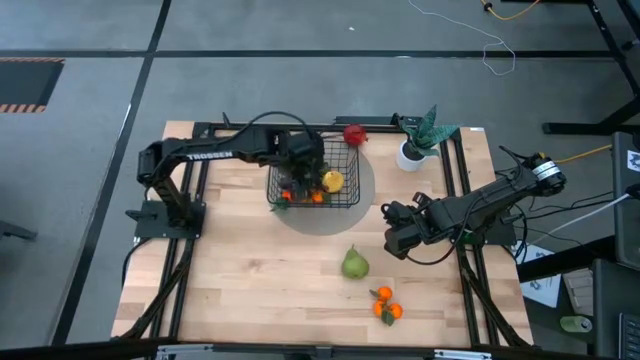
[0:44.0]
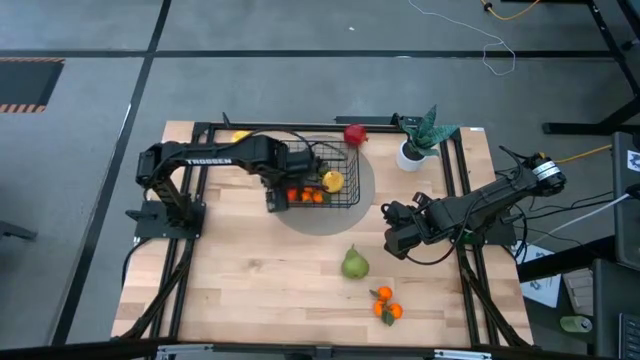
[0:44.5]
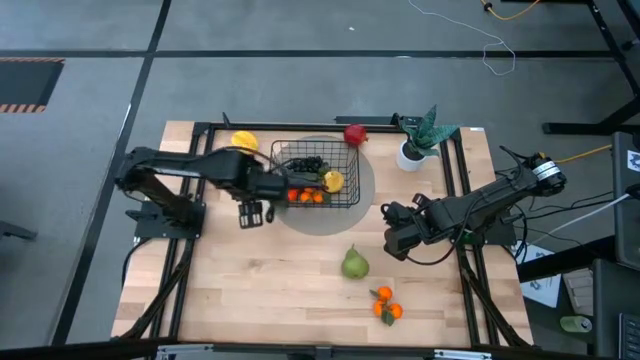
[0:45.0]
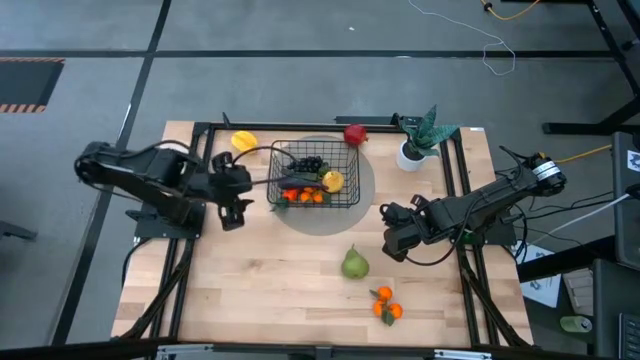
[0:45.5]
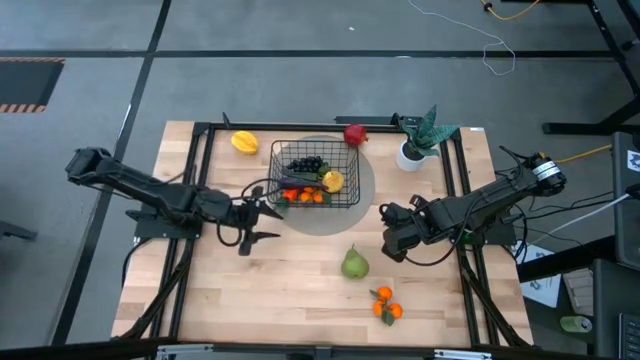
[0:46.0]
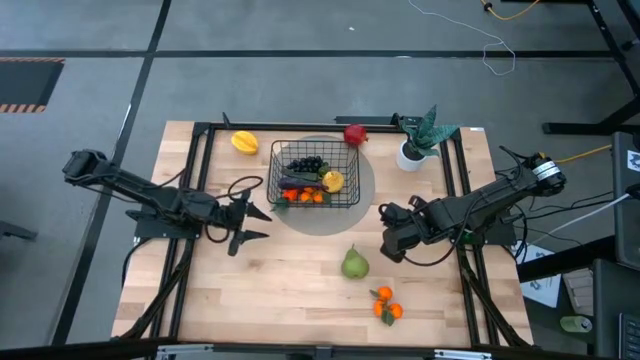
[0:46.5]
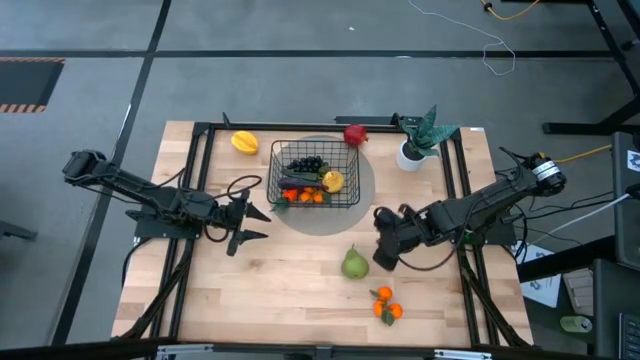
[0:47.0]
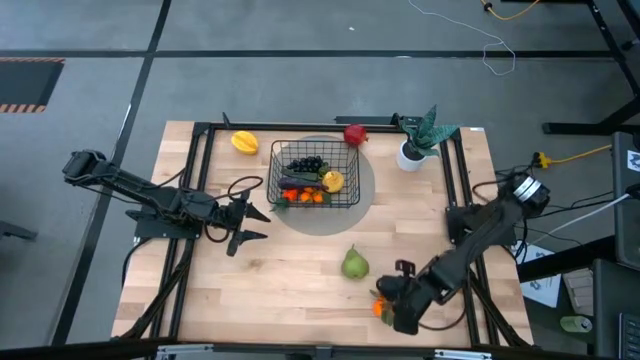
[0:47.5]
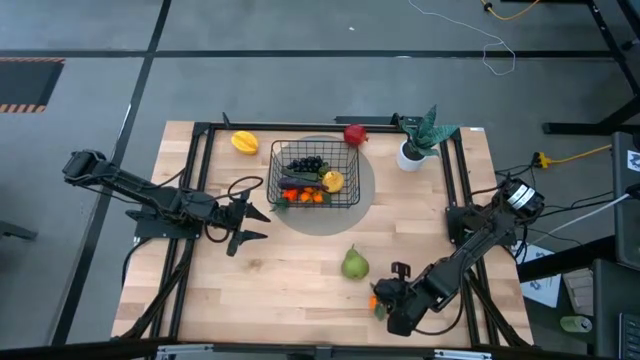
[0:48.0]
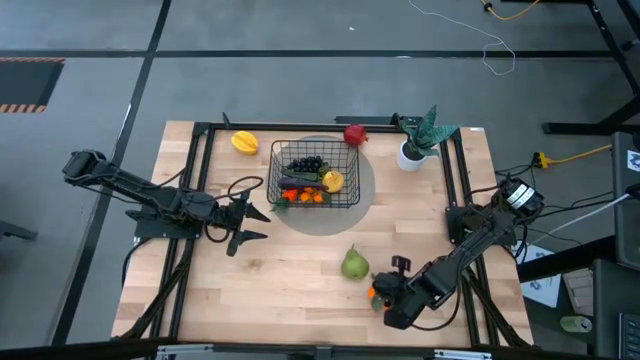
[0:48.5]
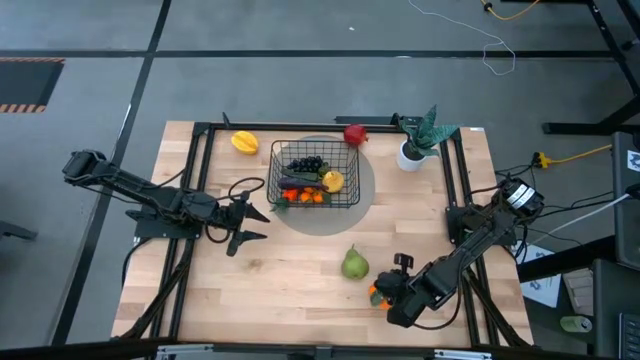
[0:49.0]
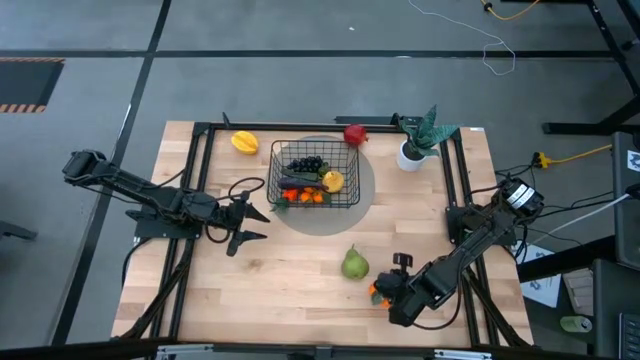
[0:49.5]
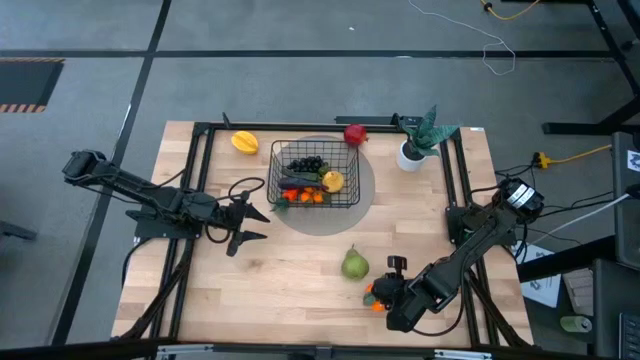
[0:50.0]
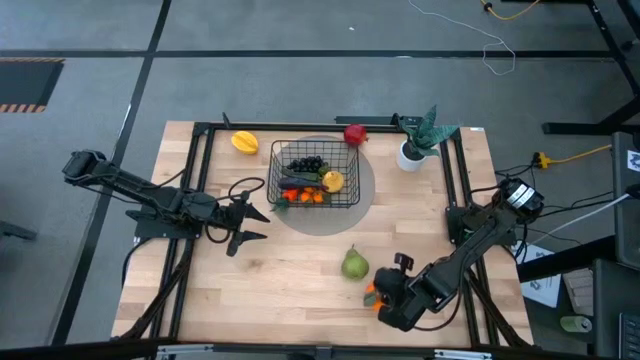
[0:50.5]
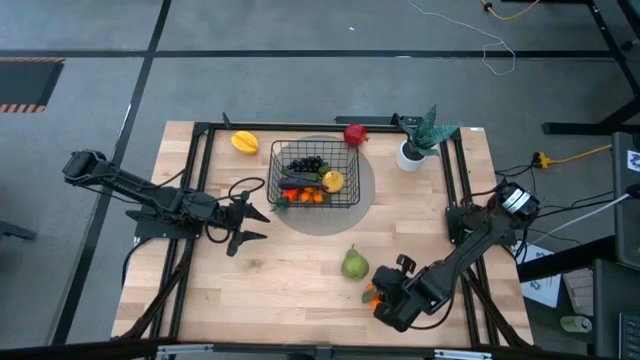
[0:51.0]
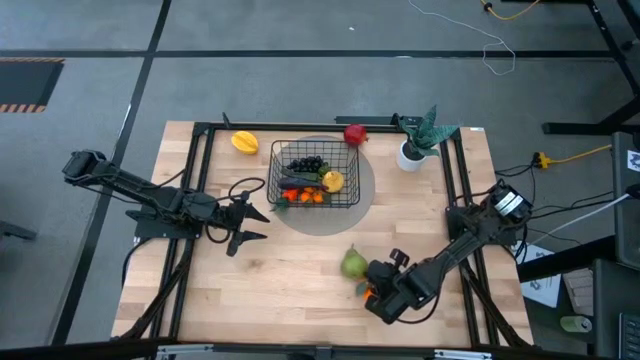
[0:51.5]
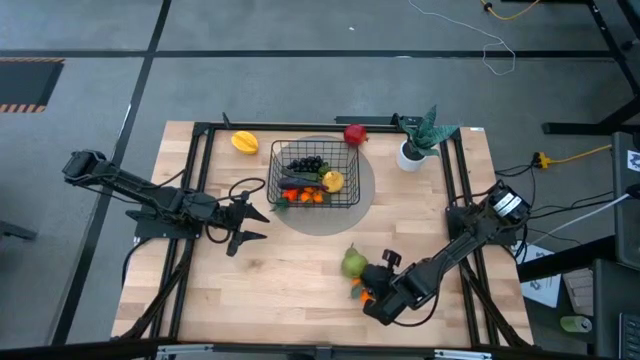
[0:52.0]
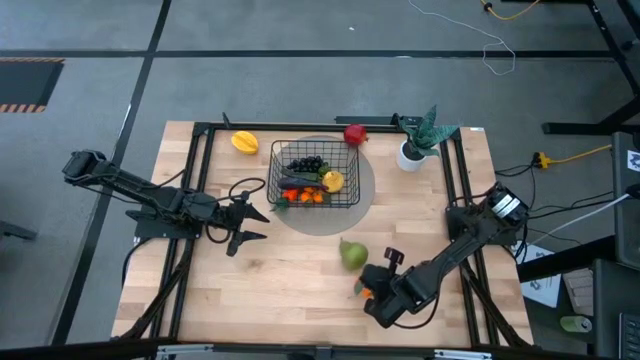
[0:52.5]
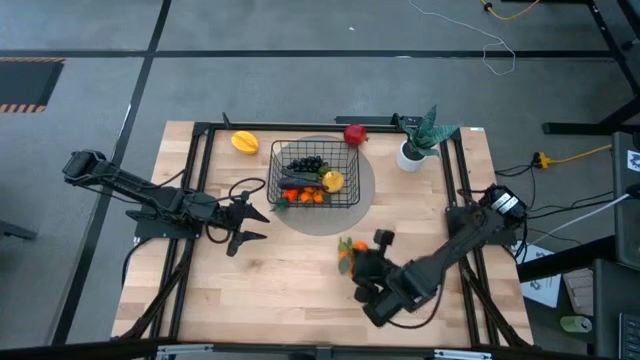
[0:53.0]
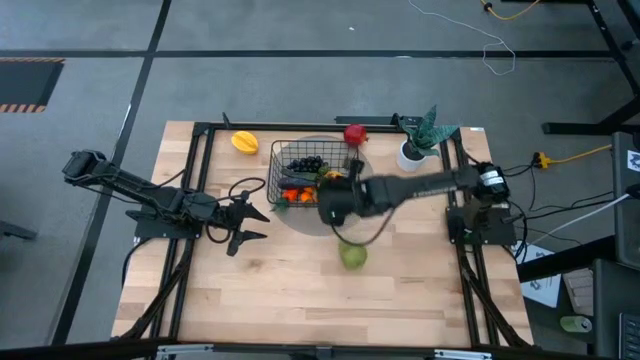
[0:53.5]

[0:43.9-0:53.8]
Task: Build produce basket
Put the orange tangerines into the wire basket

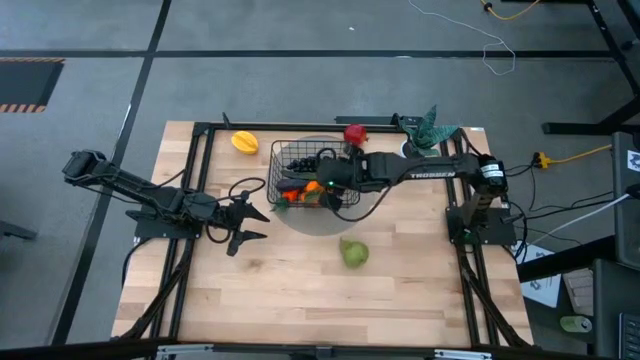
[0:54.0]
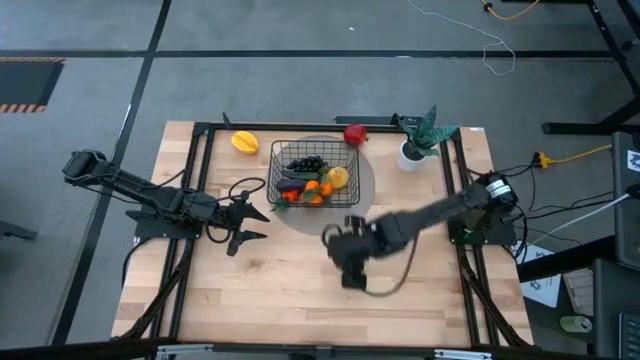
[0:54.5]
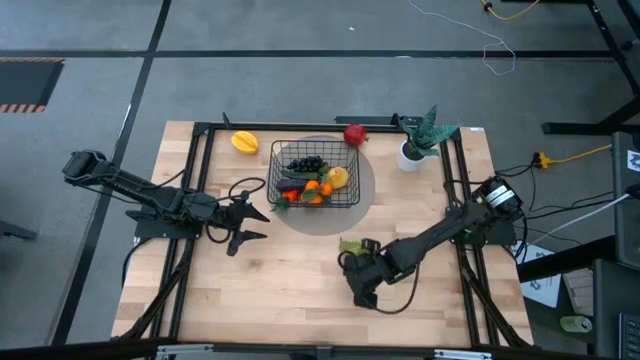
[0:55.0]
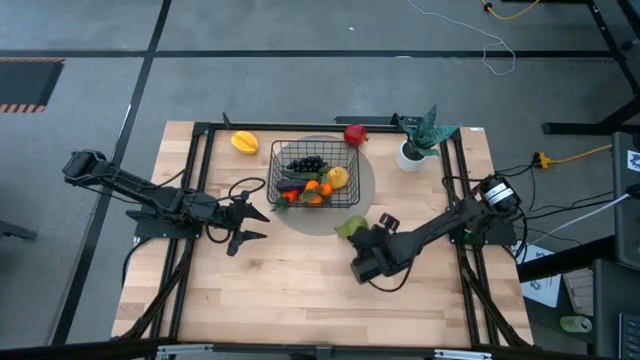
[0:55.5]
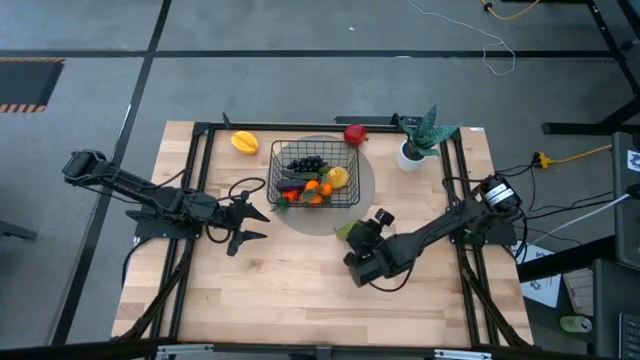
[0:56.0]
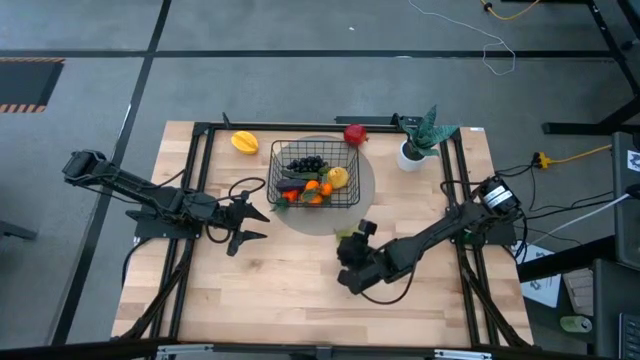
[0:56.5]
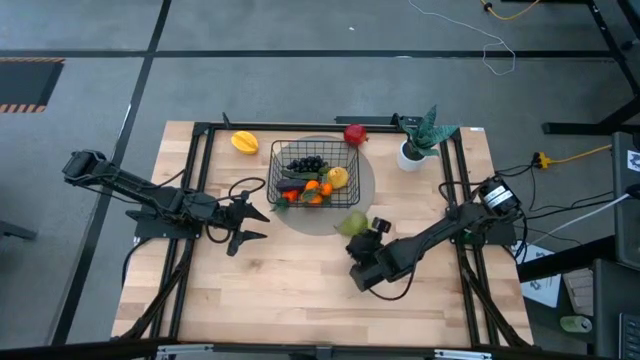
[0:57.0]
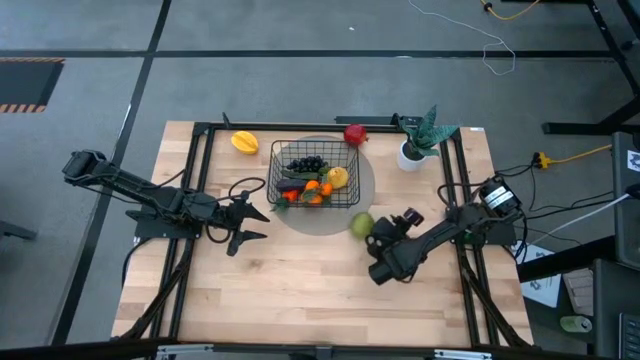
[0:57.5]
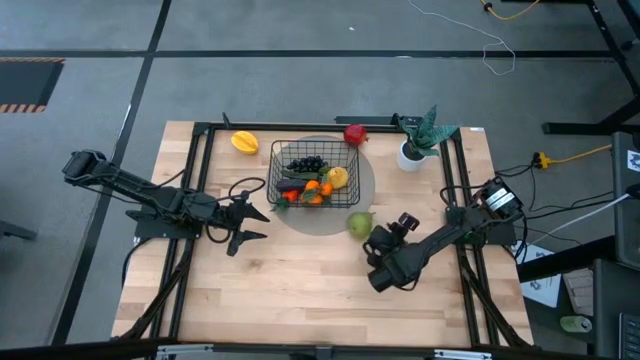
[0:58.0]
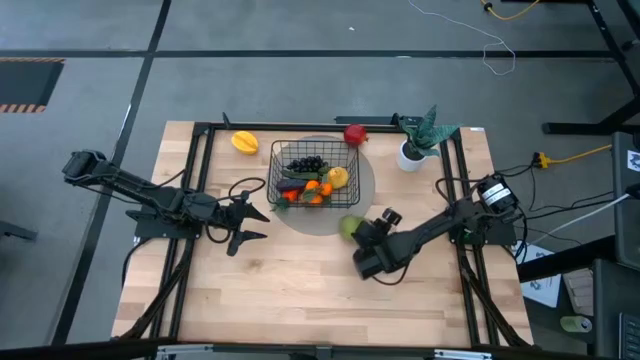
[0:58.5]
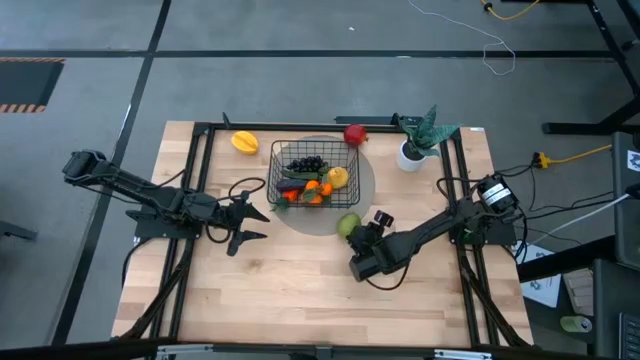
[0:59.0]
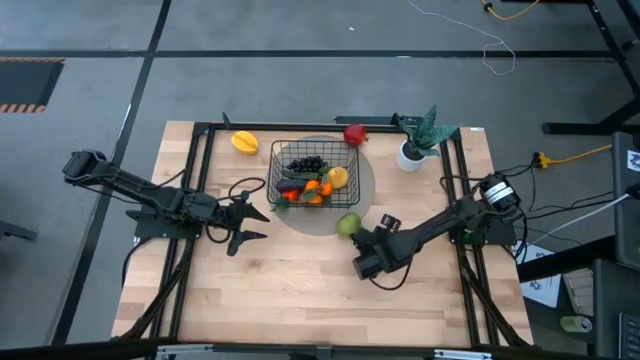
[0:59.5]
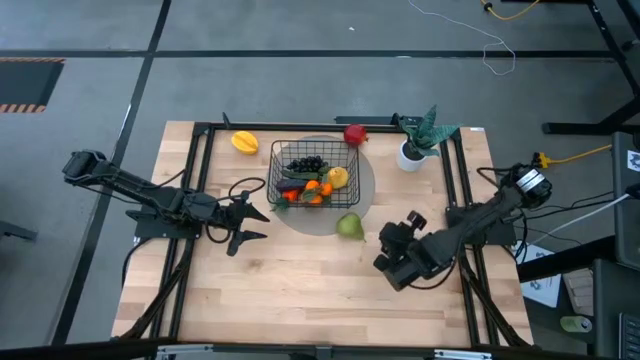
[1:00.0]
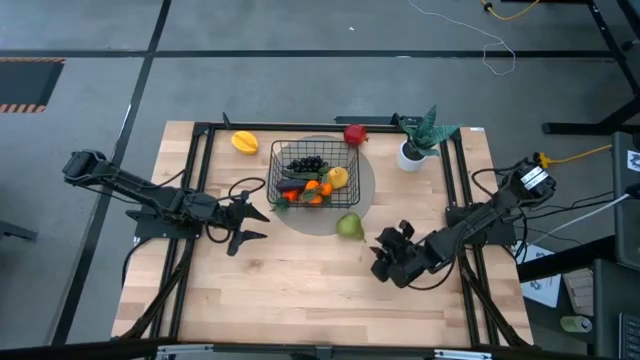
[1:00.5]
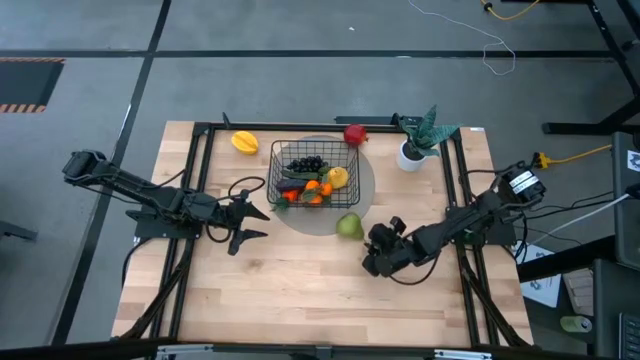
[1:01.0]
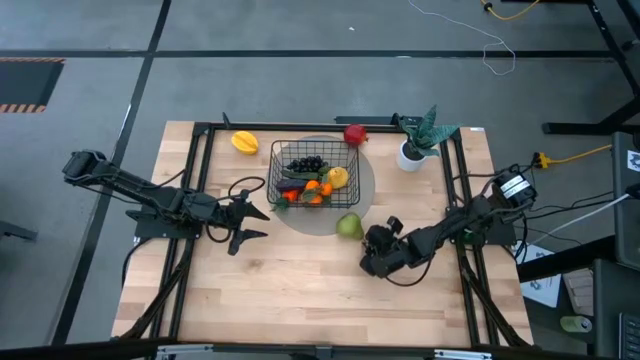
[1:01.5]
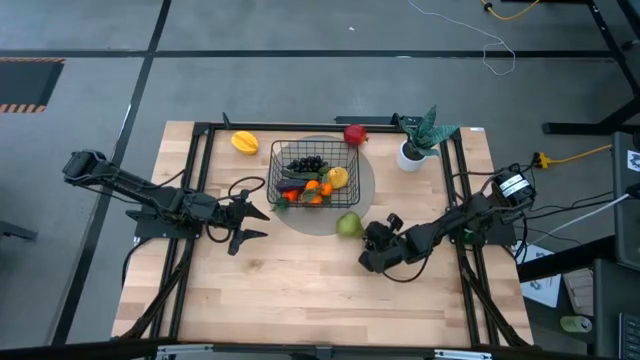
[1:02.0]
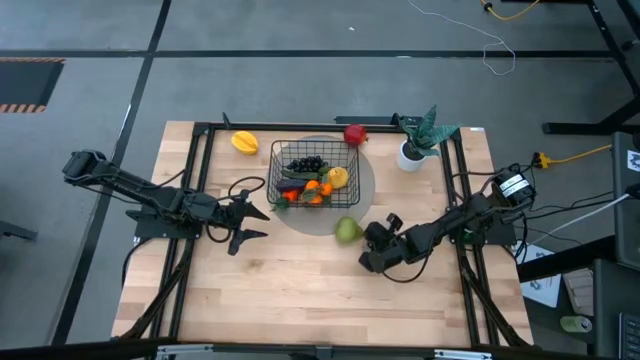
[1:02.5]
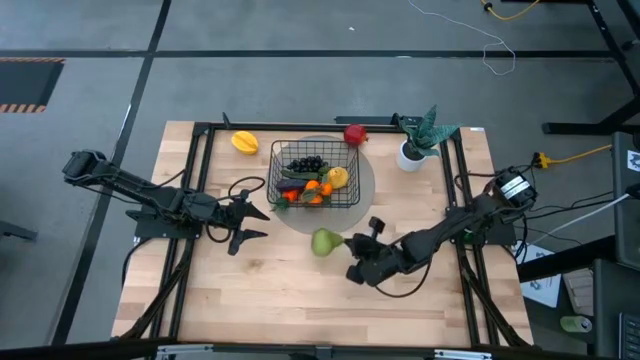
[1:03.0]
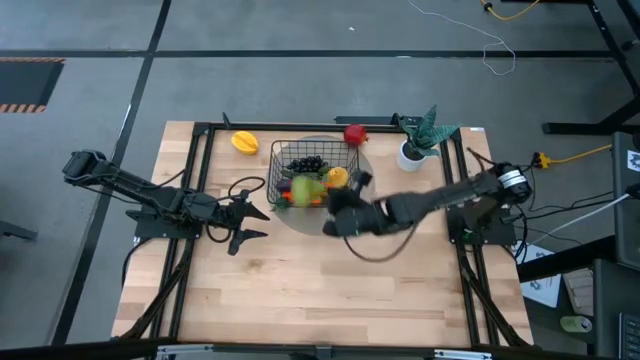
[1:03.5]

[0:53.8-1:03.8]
Put the green pear into the wire basket

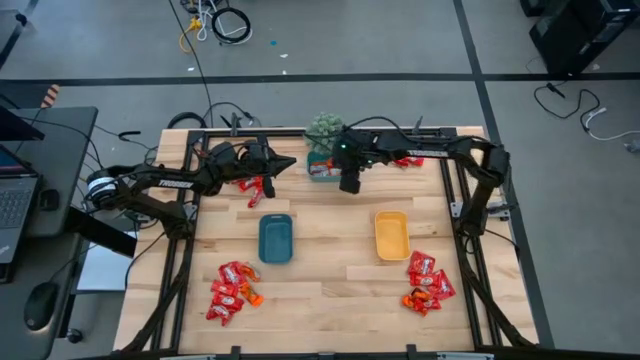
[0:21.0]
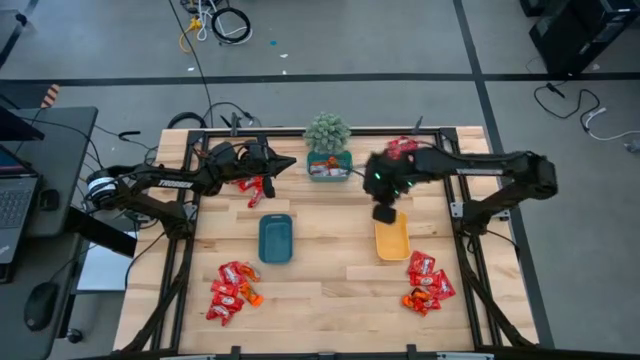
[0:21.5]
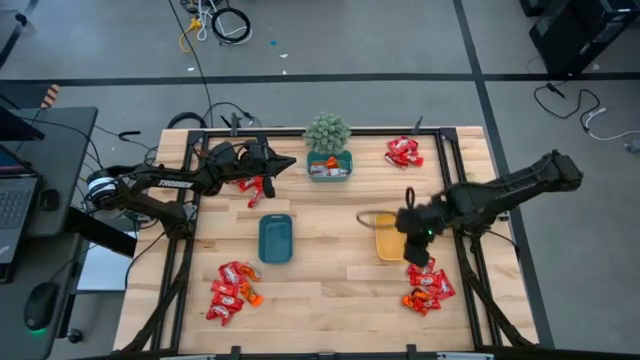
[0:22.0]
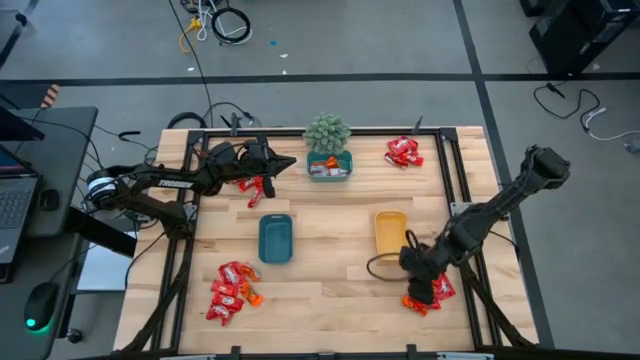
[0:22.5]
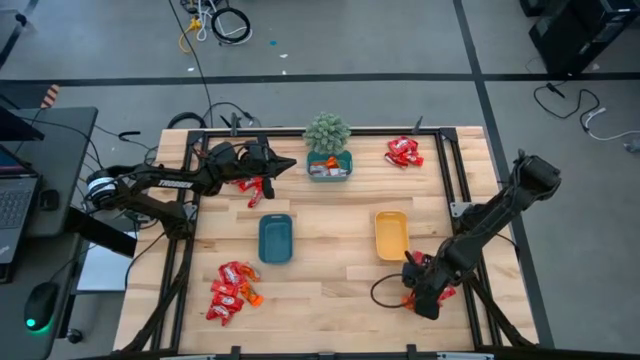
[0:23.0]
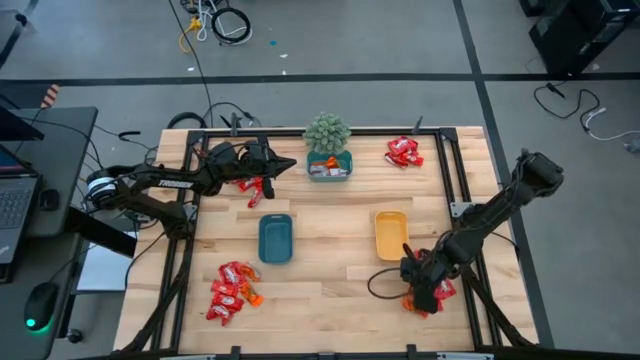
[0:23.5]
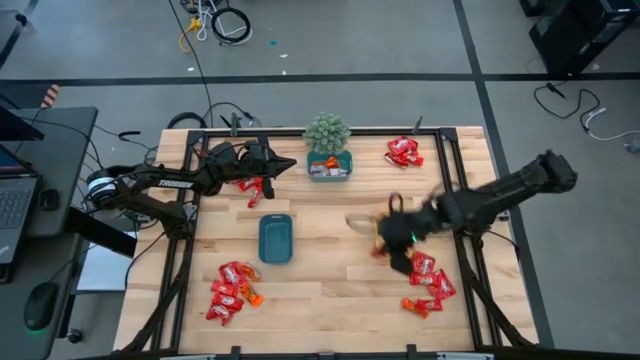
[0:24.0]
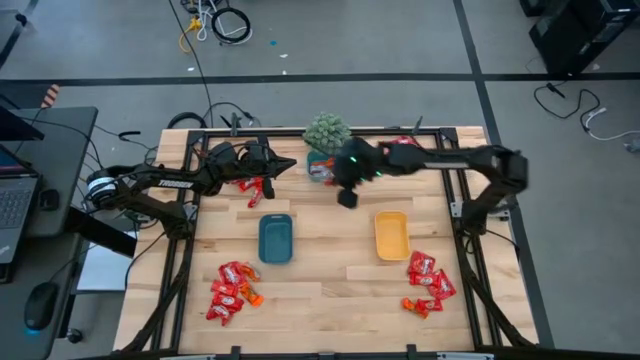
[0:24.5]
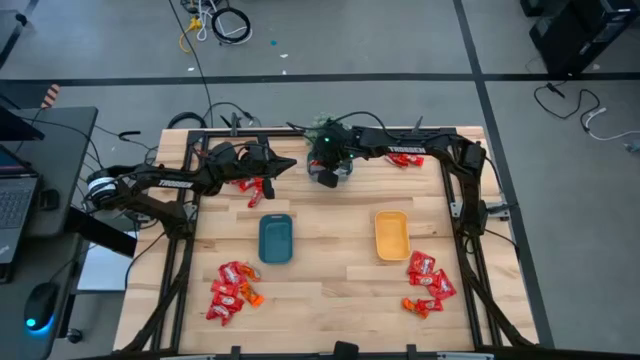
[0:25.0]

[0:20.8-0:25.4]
Task: Sort candy
Put the orange chocolate into the green bin
